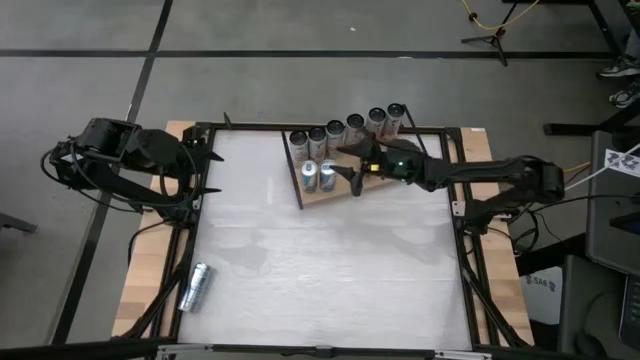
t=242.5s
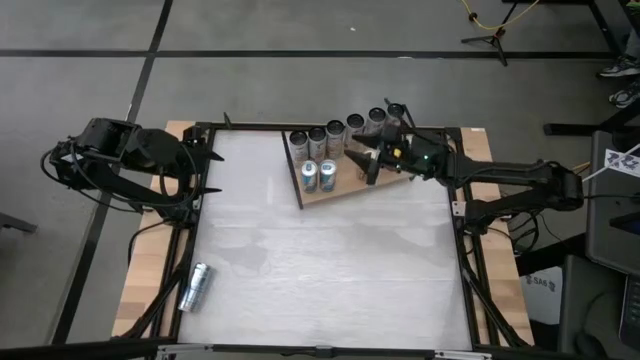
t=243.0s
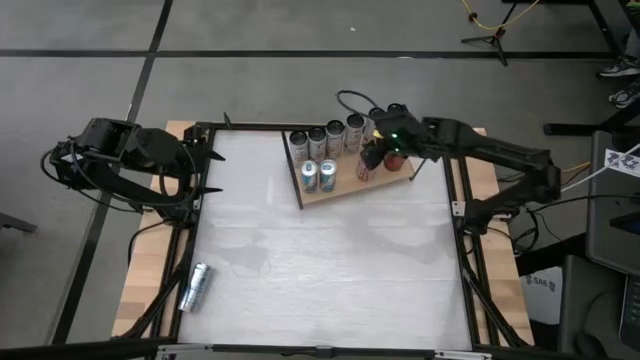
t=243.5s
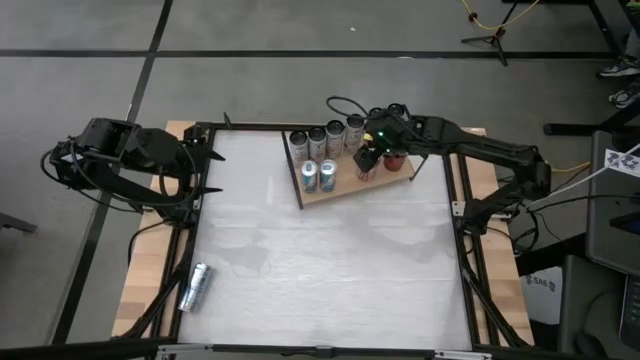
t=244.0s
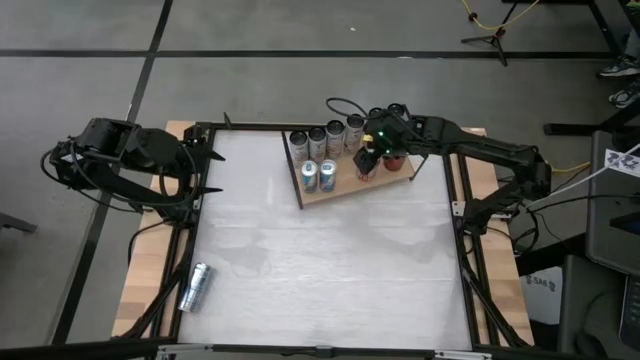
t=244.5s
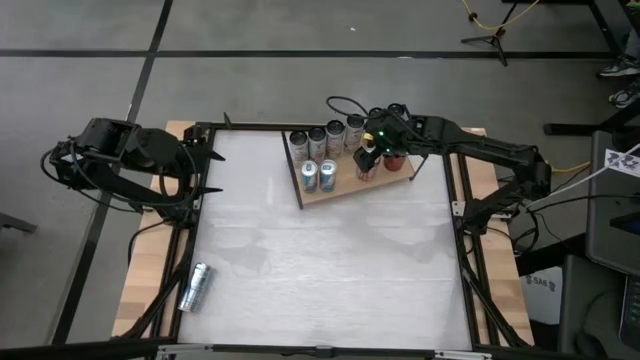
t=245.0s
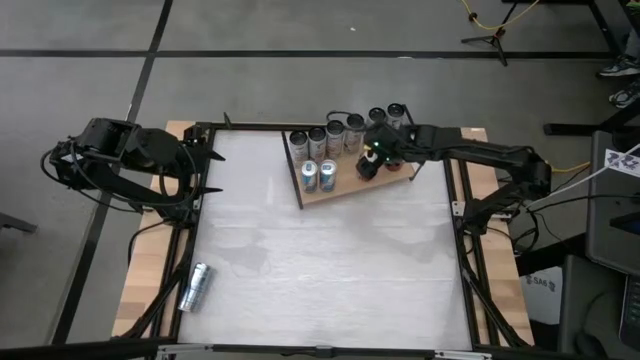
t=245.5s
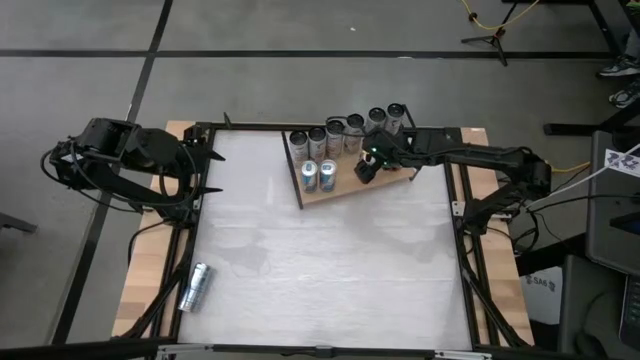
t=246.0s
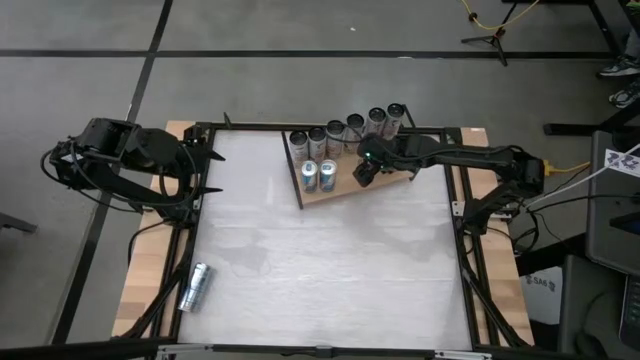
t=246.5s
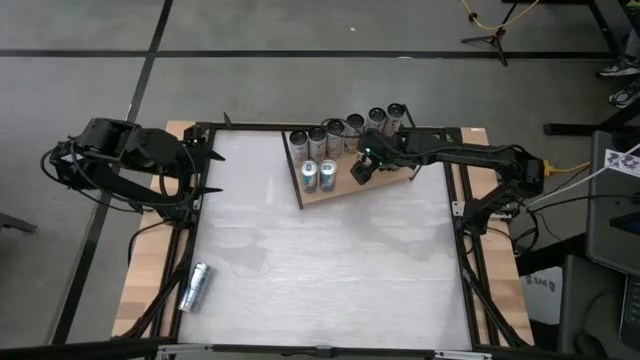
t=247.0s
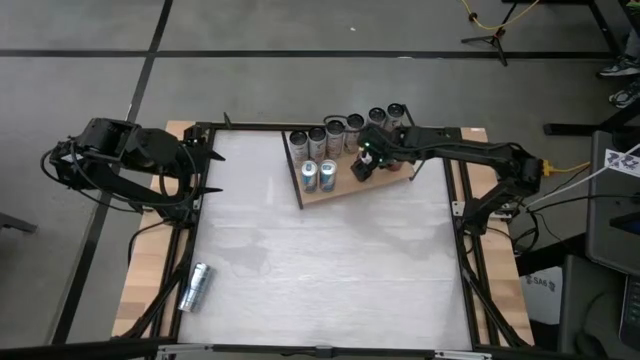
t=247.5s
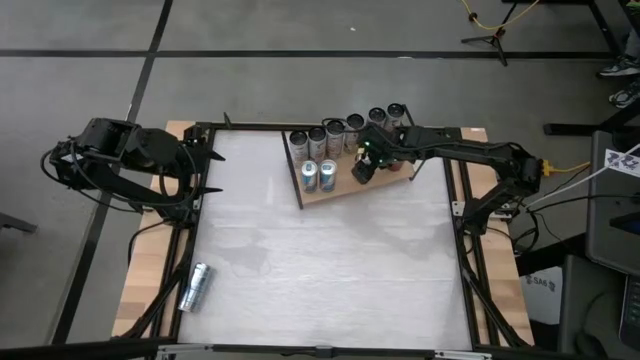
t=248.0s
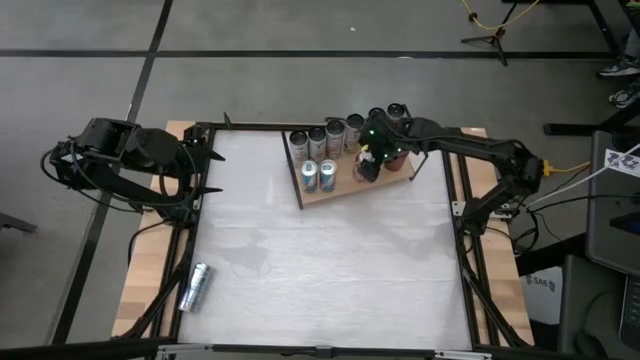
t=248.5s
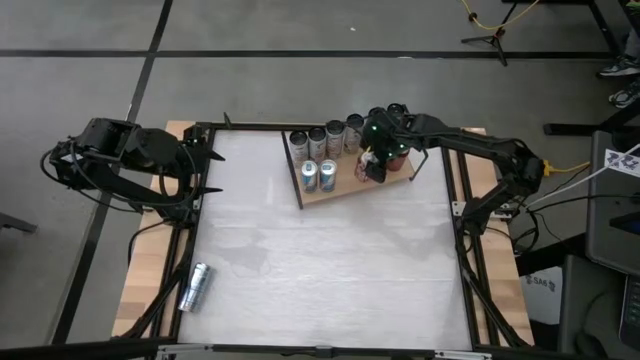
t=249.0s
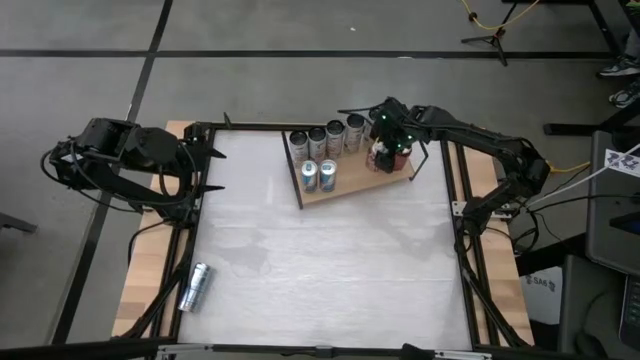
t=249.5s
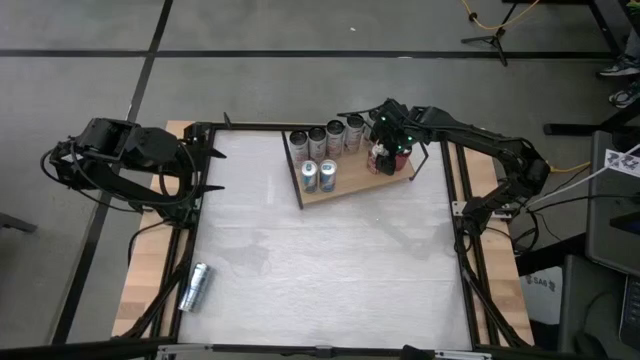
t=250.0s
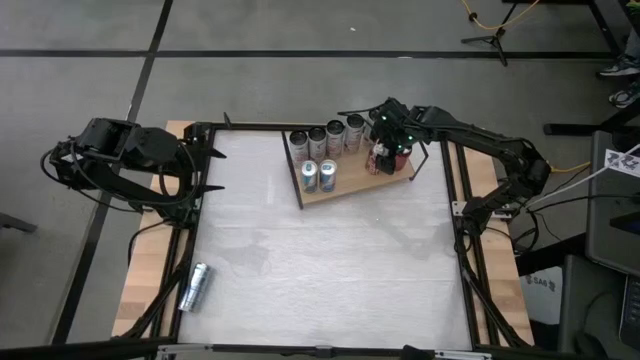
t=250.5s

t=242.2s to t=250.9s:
Task: Place canned beverage on shelf
Adjust the red black soda can on the shelf

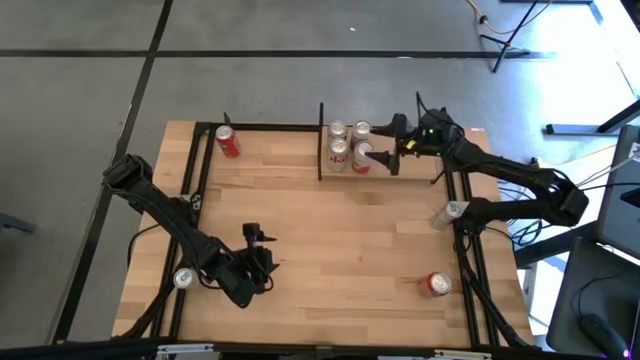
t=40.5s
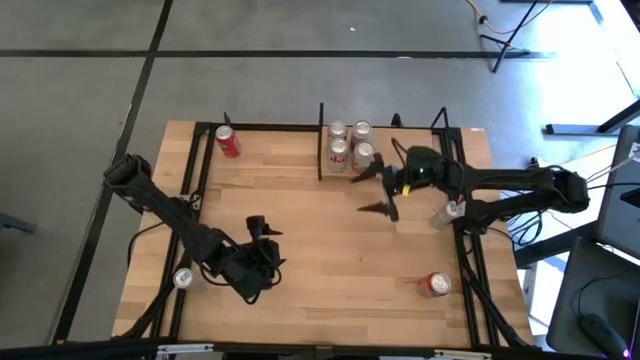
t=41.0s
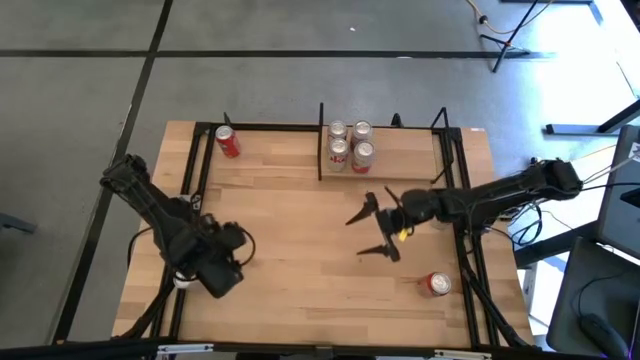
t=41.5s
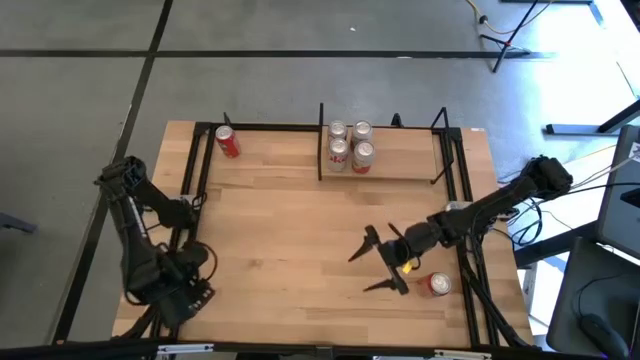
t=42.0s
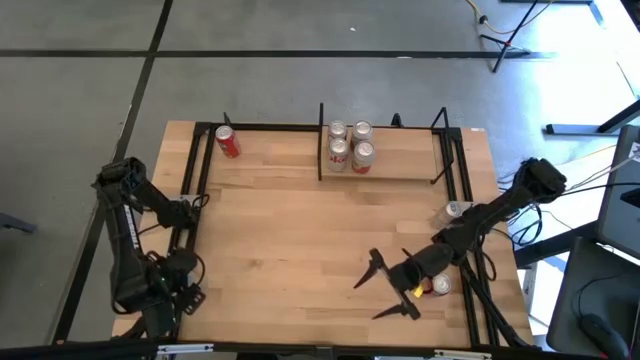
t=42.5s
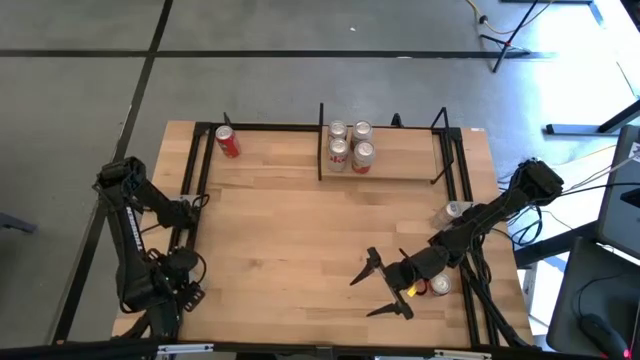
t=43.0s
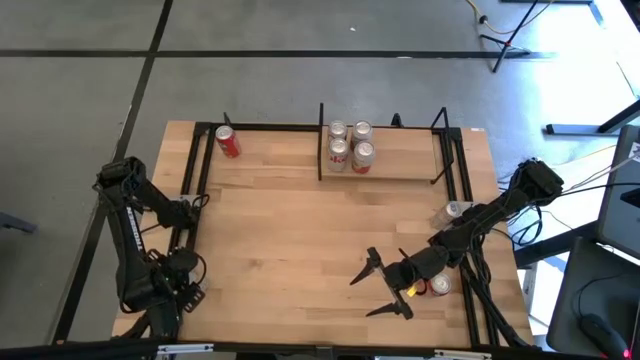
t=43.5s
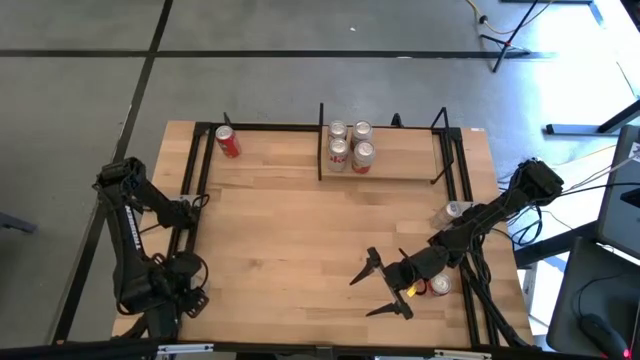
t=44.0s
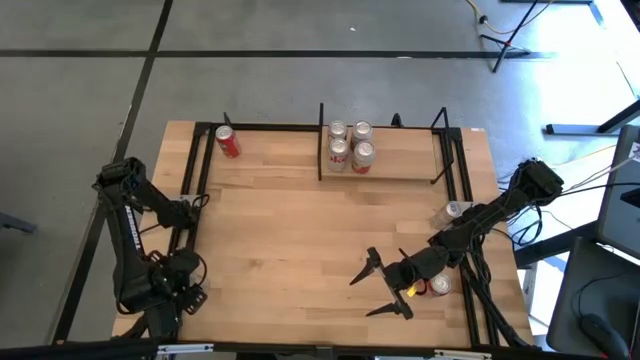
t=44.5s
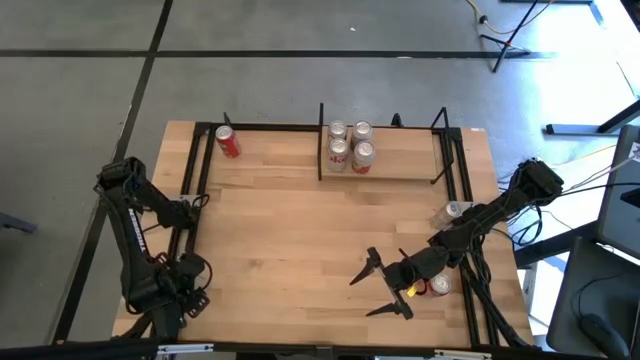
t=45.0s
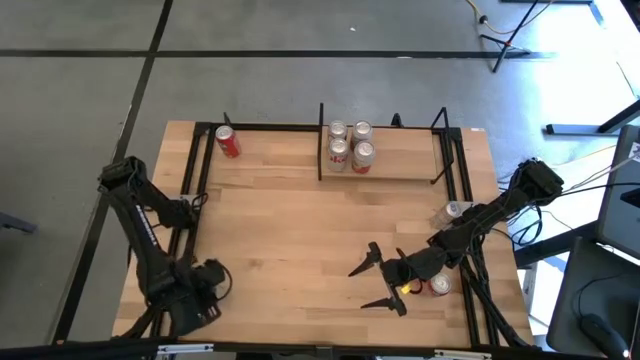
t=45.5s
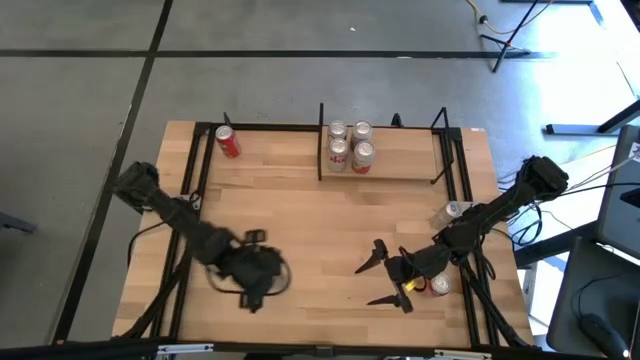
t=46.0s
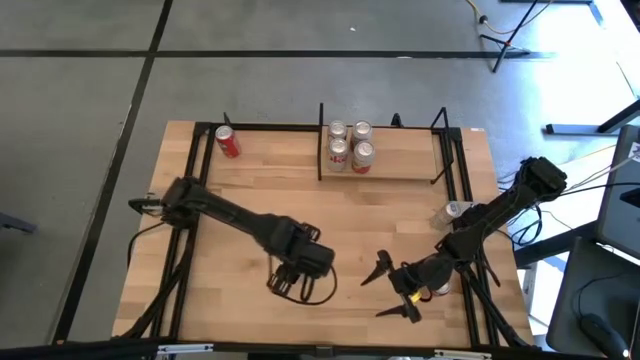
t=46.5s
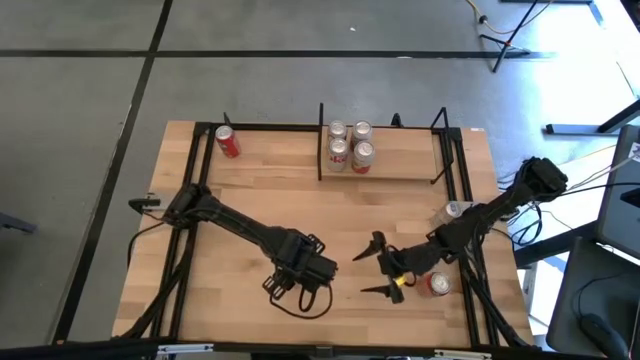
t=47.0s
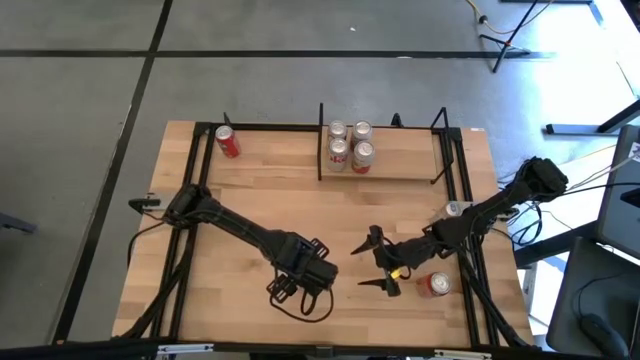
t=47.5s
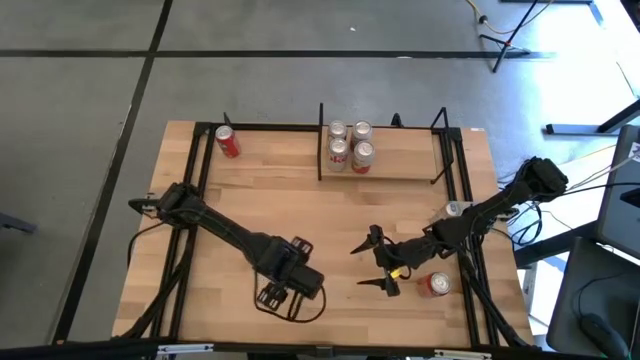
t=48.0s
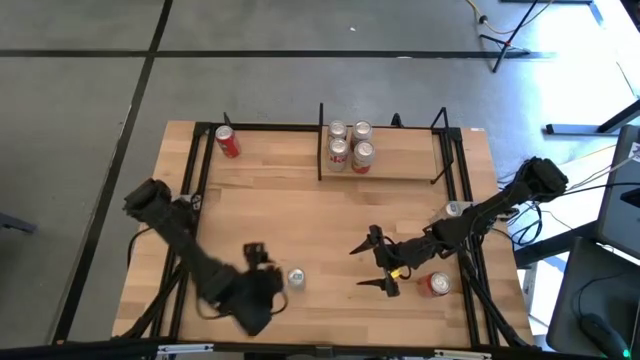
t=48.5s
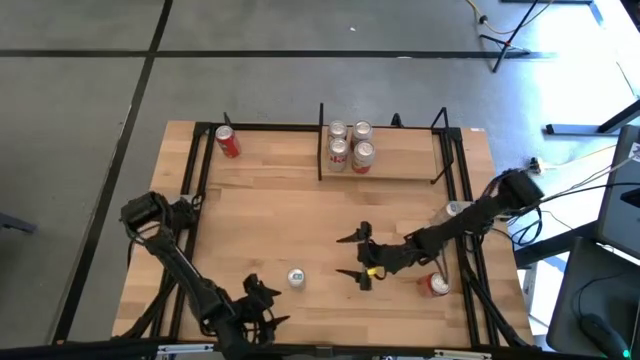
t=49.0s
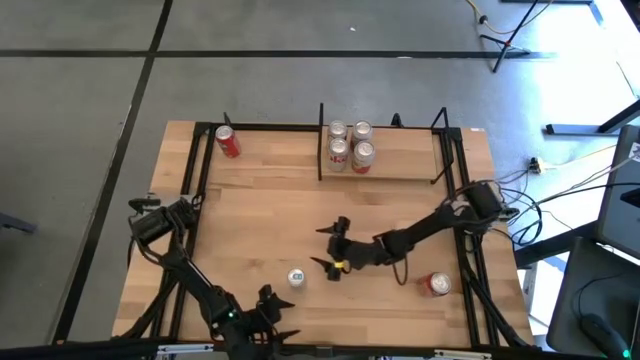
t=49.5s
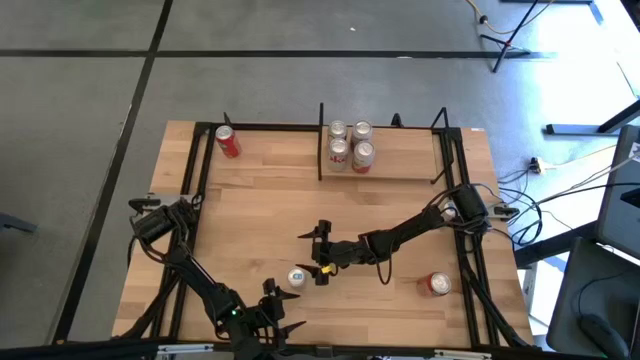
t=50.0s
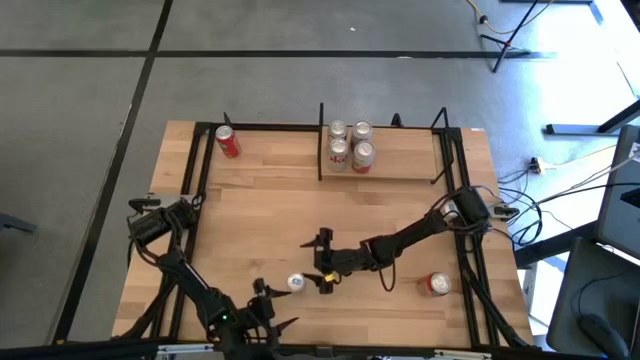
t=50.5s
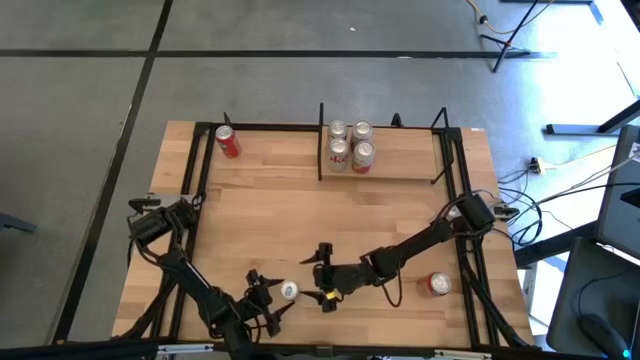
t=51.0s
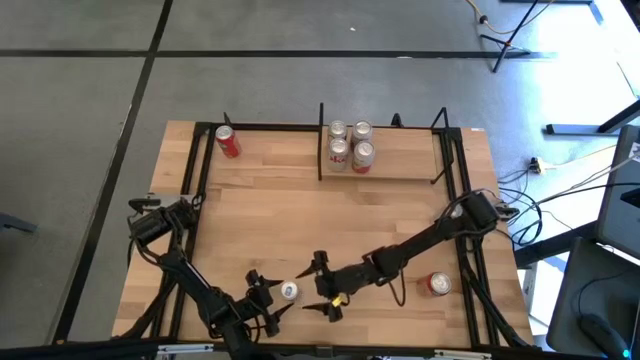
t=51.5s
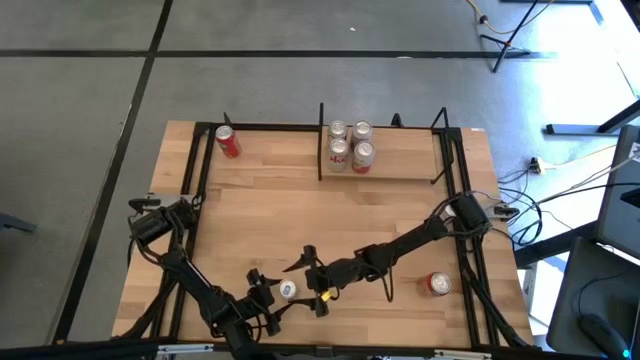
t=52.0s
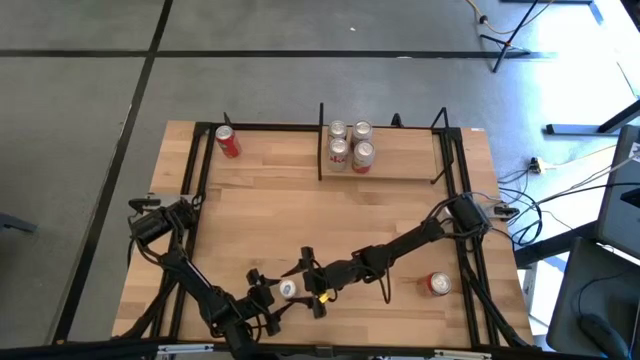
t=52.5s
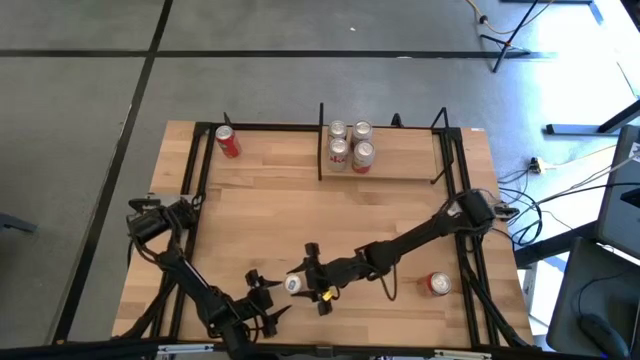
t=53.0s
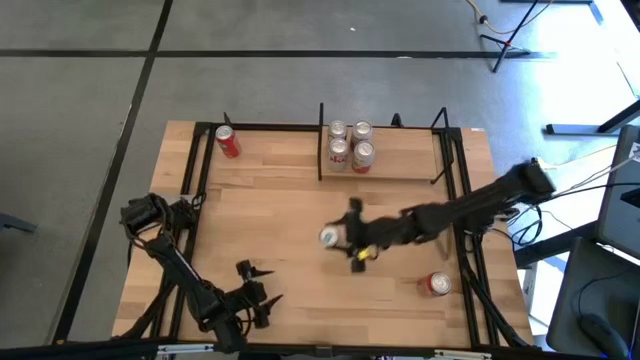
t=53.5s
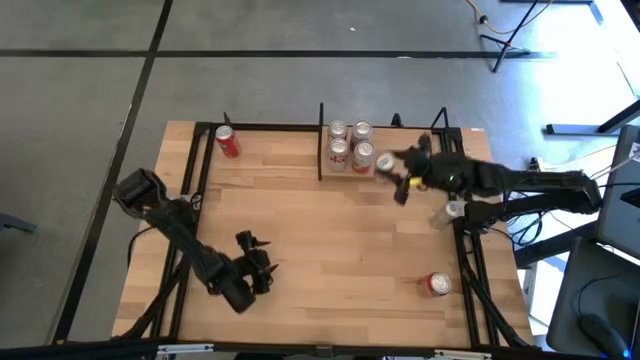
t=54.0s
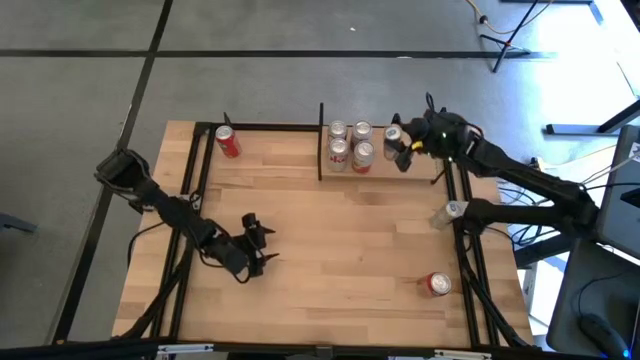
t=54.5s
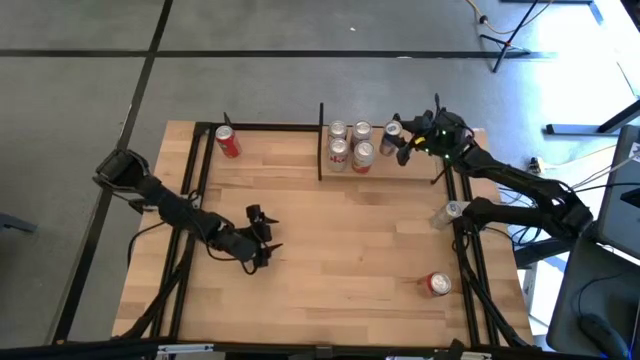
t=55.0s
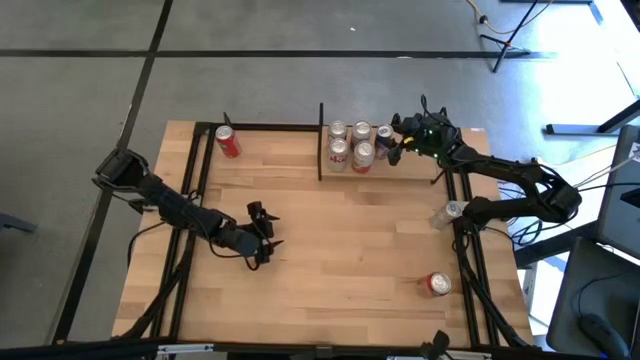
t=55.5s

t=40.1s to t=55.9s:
Task: Place canned beverage on shelf
Put the bottom blue soda can on the shelf
